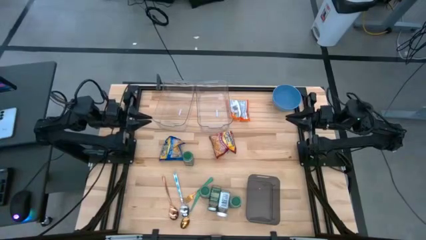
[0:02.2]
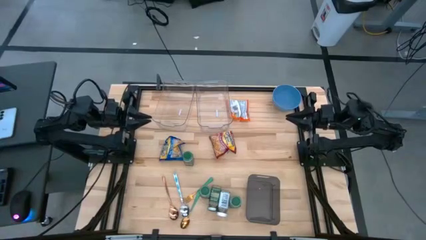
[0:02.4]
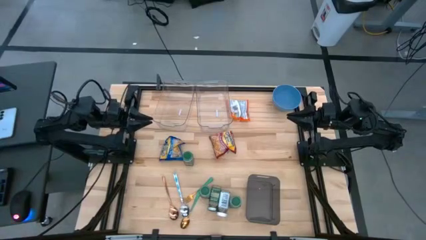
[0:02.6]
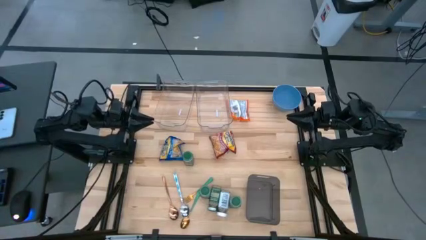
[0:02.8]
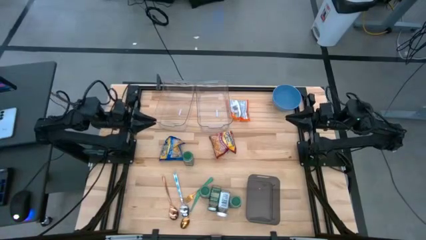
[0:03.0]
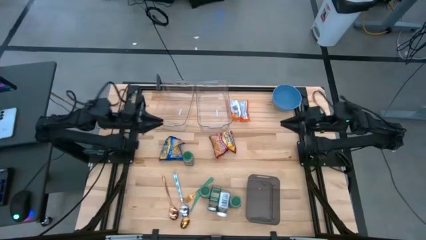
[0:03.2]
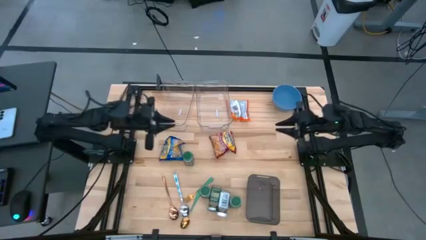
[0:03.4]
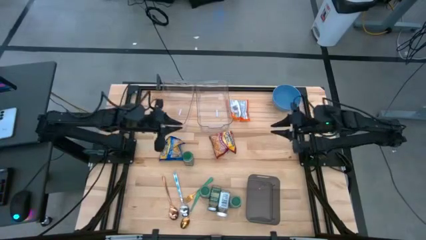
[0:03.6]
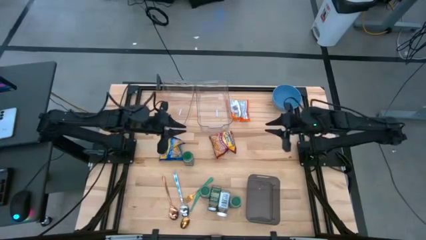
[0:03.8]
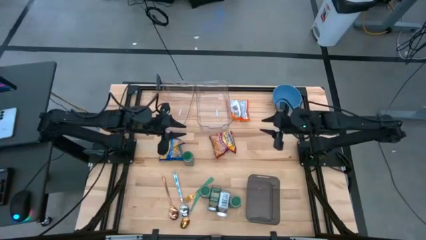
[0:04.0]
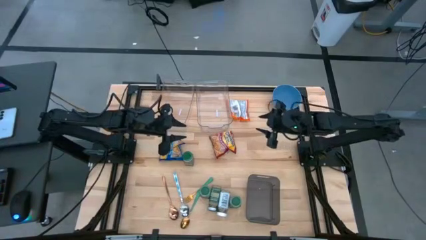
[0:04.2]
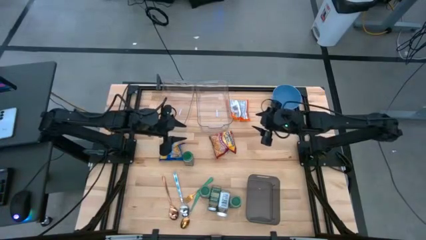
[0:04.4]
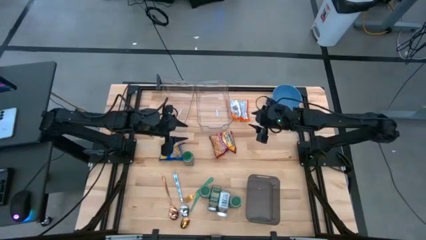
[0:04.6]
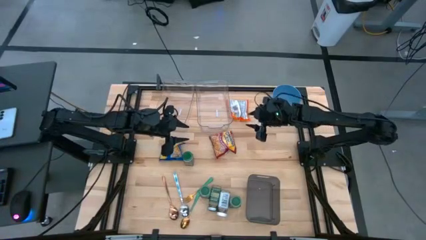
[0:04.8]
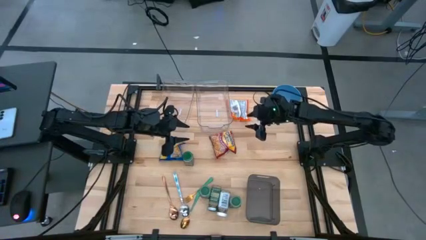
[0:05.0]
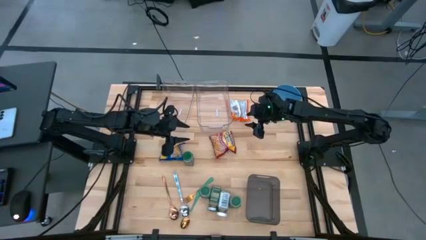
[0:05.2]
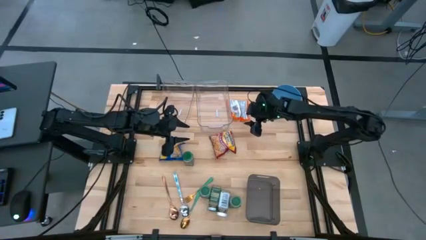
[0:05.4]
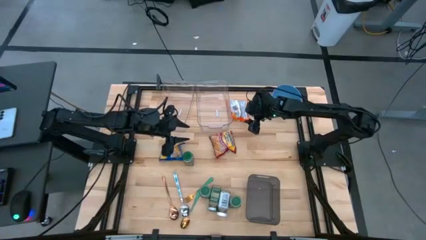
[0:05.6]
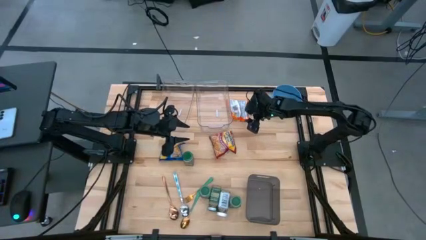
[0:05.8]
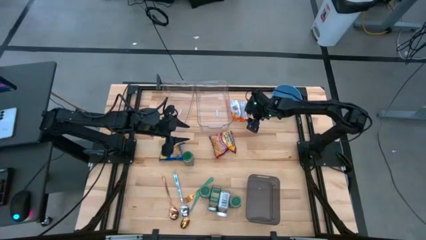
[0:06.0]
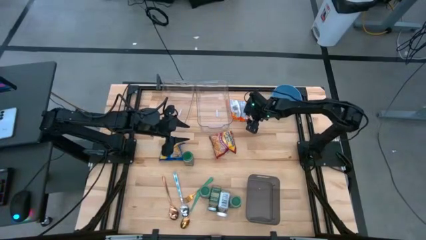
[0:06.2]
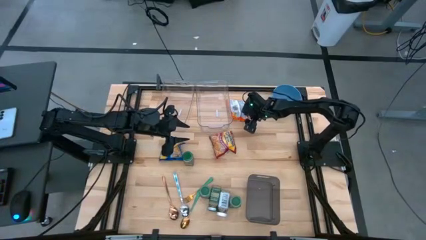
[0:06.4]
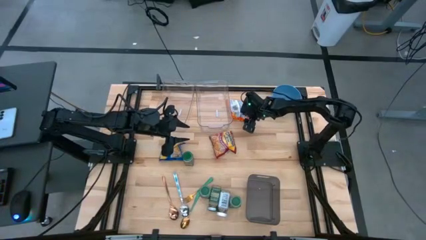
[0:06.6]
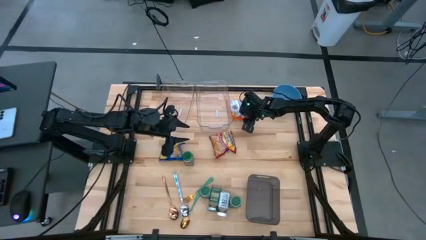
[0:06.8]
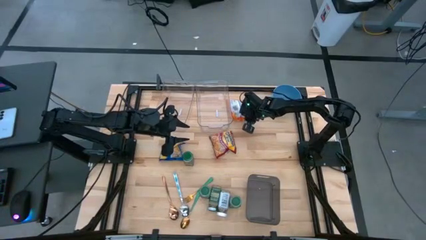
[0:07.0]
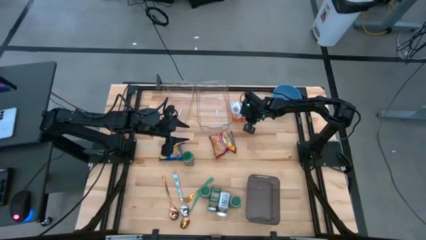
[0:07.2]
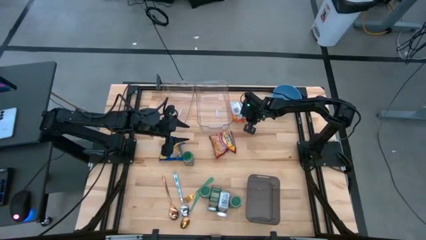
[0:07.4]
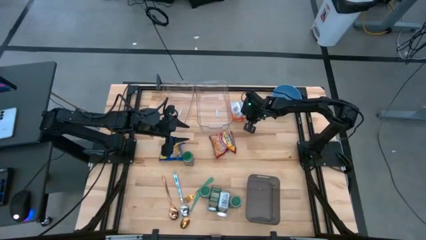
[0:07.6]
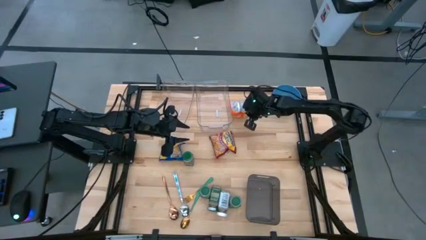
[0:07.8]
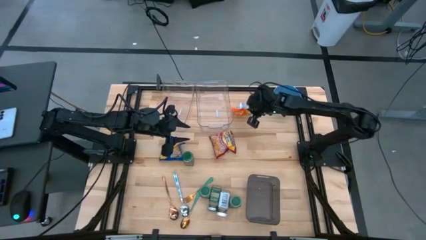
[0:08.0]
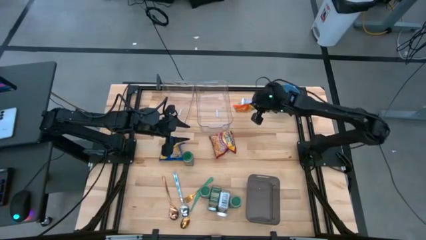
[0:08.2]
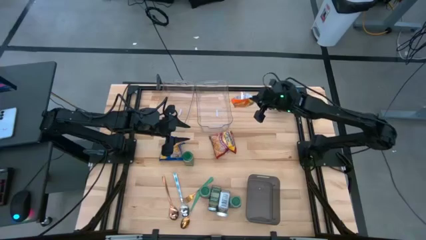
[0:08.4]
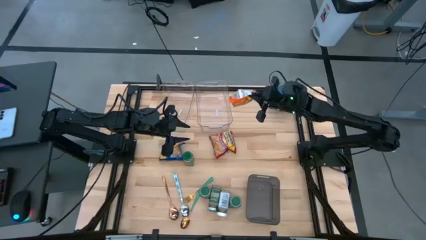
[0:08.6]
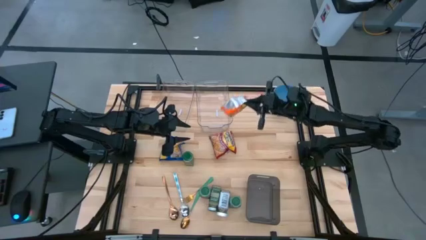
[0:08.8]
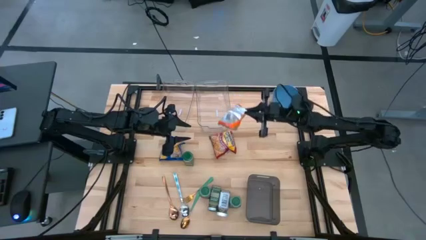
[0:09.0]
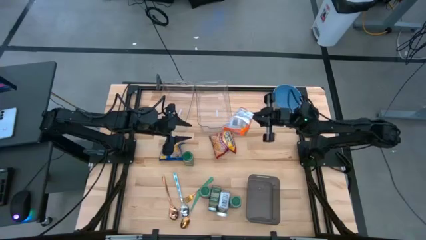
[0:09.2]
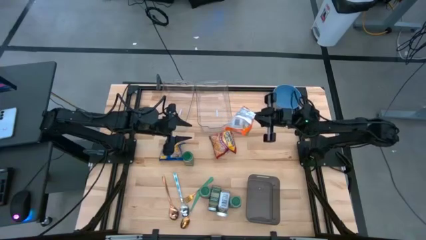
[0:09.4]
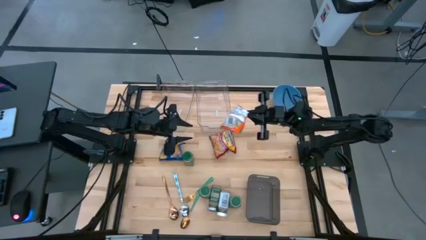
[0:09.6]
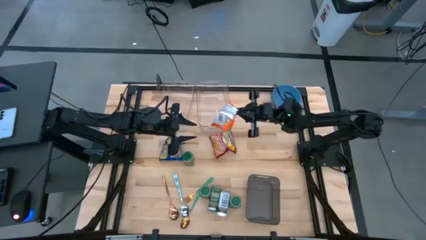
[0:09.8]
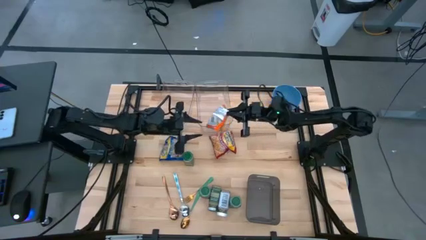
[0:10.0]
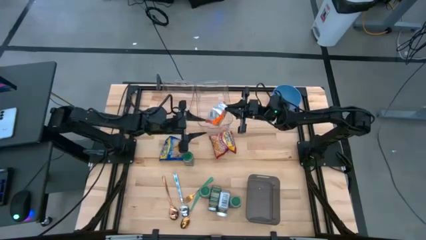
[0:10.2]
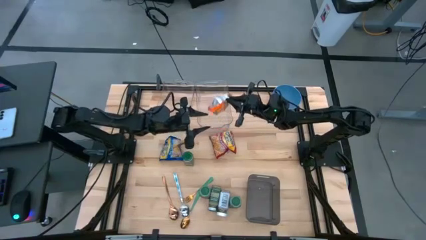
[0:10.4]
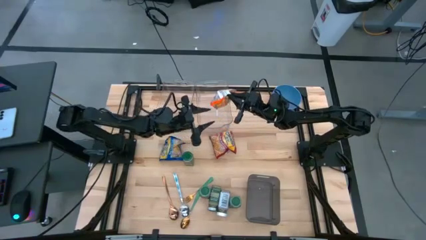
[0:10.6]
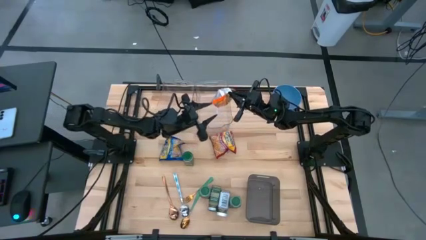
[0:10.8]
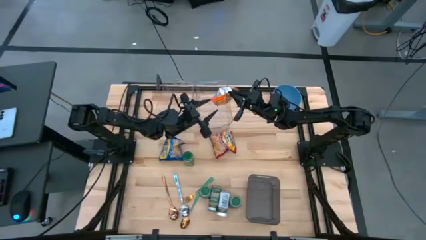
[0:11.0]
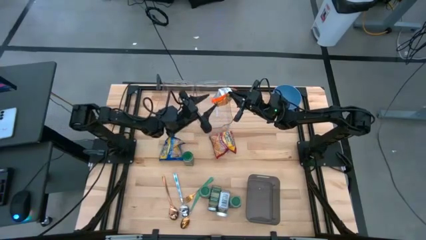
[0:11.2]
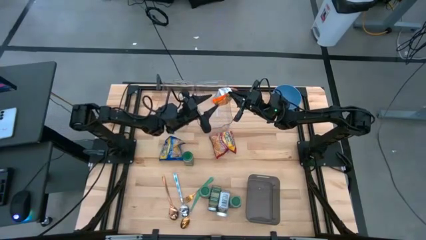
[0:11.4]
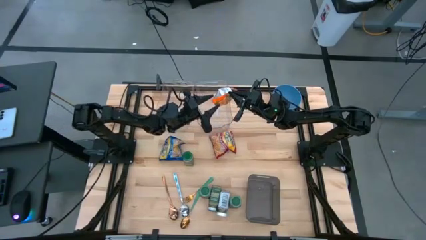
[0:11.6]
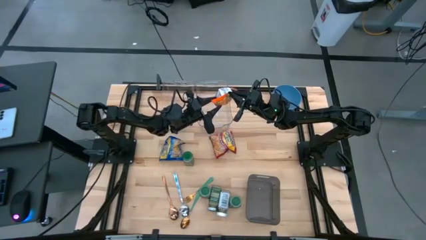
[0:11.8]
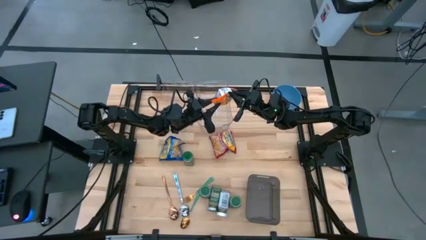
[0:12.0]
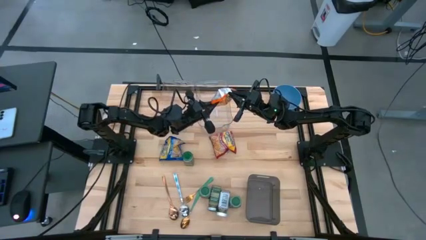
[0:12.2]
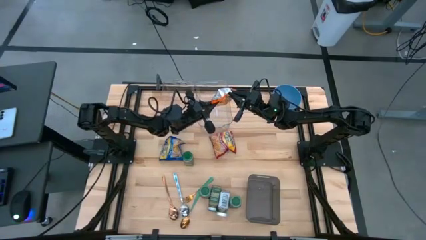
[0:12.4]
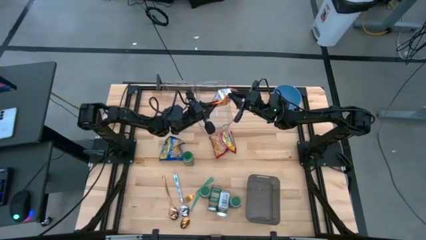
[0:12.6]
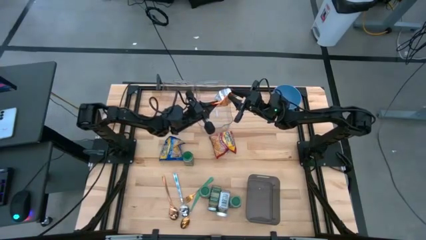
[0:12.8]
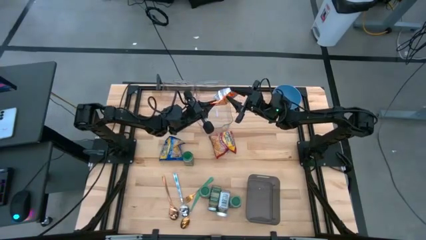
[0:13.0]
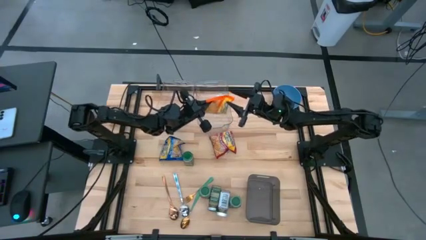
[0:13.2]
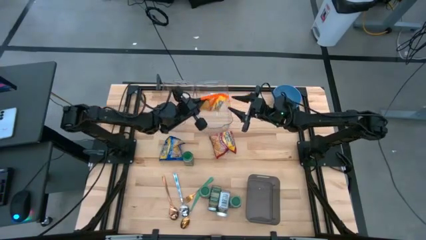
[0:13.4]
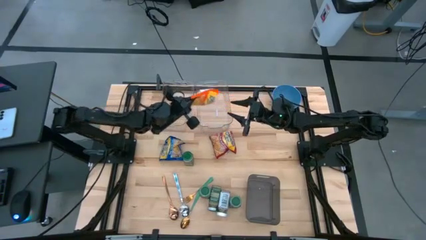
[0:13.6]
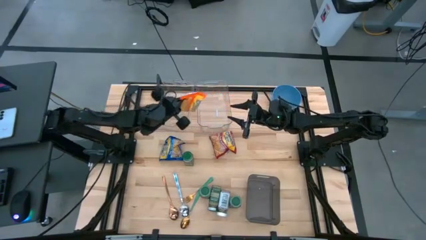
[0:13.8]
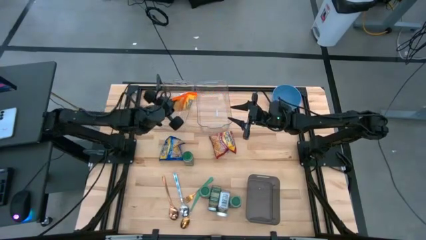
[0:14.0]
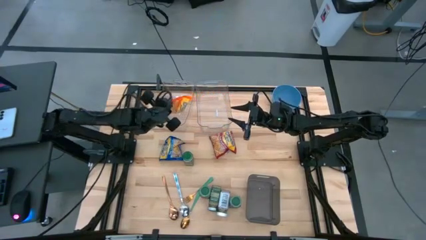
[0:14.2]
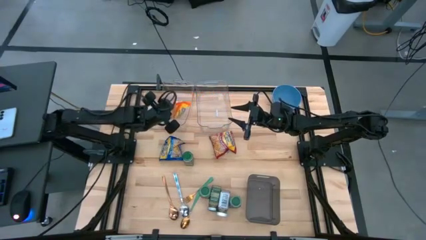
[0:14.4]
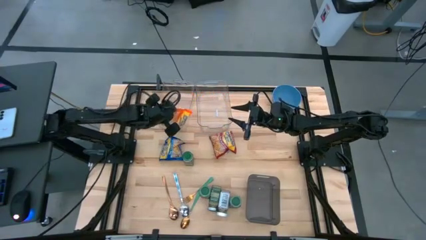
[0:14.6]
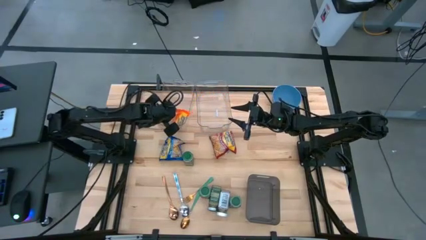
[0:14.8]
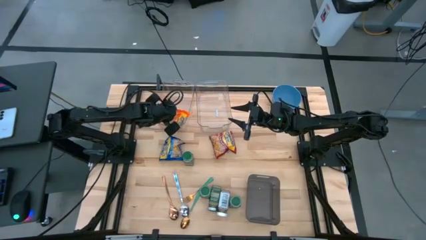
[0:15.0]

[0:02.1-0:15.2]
Put the orange noodle pack into the left transparent bin
